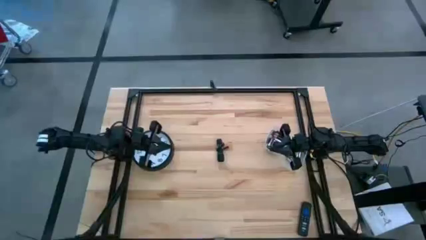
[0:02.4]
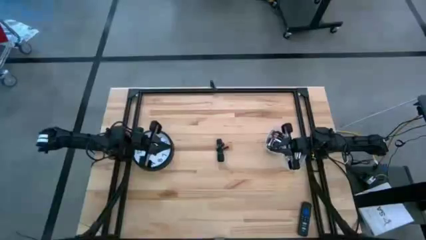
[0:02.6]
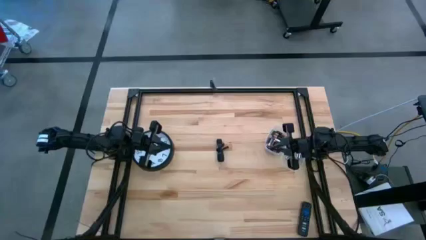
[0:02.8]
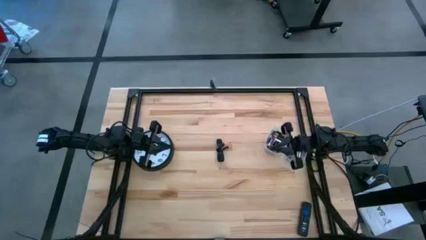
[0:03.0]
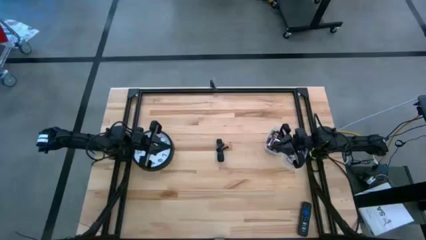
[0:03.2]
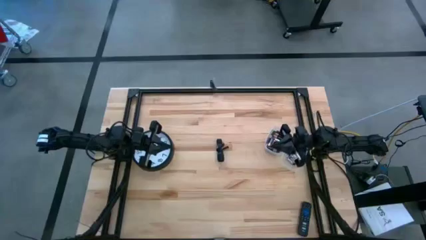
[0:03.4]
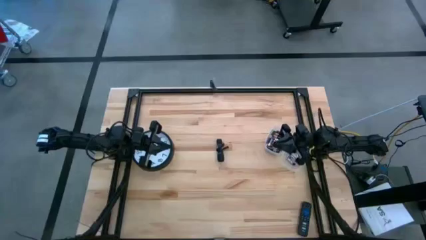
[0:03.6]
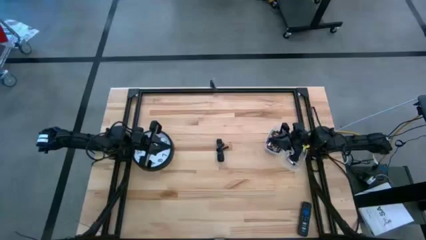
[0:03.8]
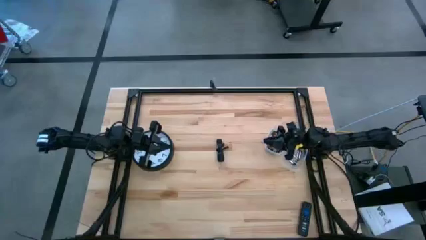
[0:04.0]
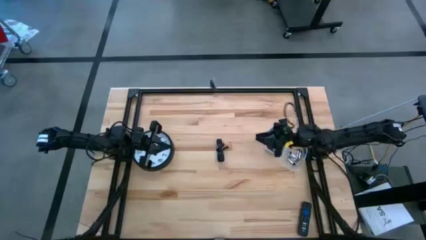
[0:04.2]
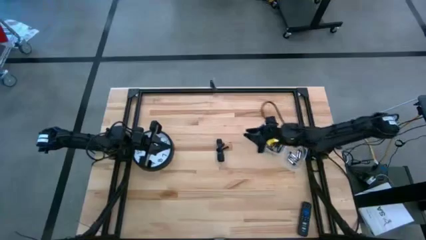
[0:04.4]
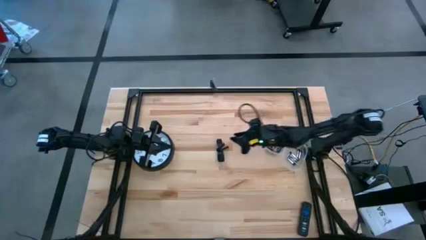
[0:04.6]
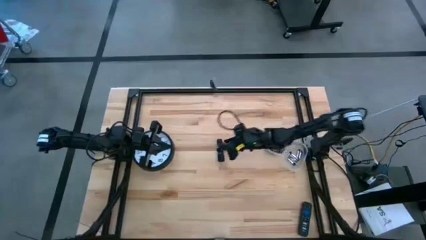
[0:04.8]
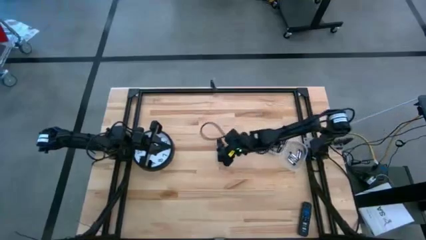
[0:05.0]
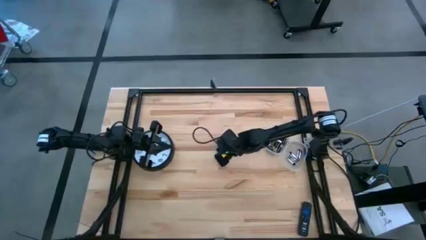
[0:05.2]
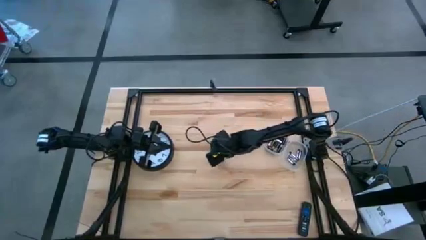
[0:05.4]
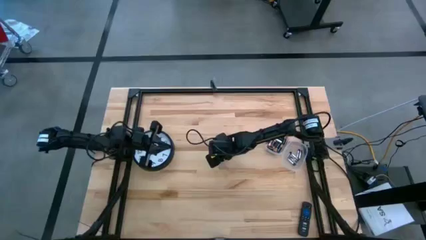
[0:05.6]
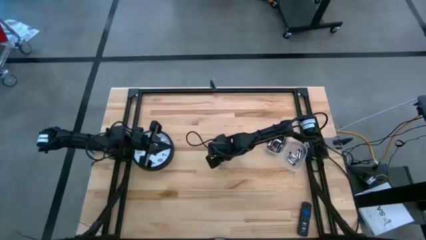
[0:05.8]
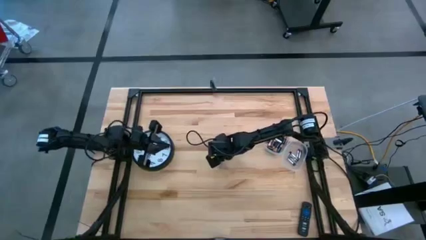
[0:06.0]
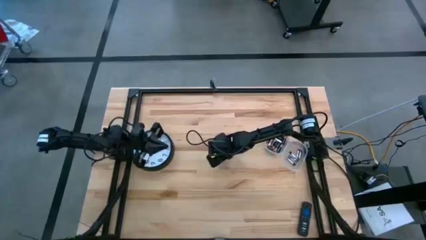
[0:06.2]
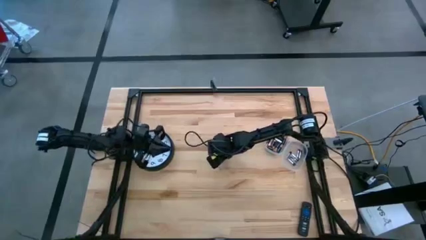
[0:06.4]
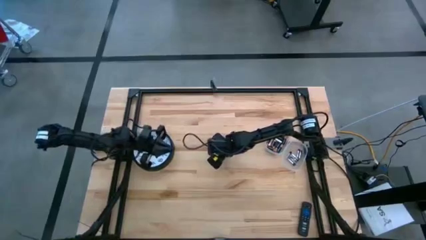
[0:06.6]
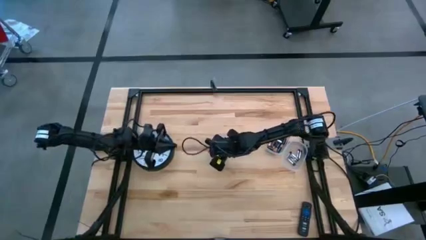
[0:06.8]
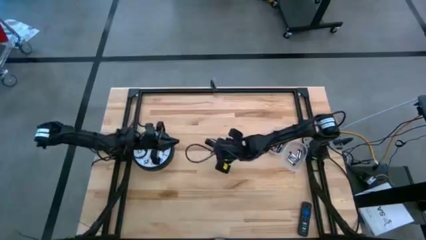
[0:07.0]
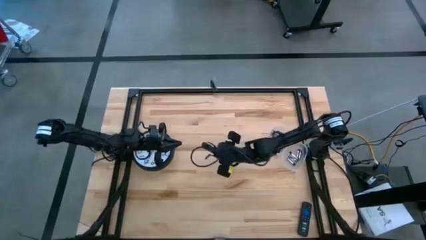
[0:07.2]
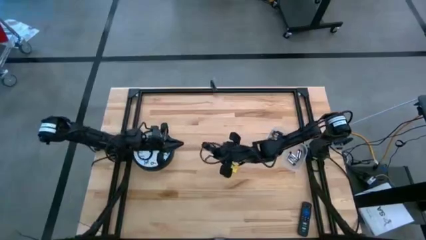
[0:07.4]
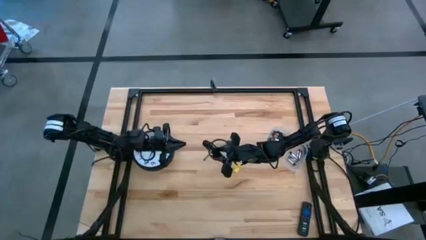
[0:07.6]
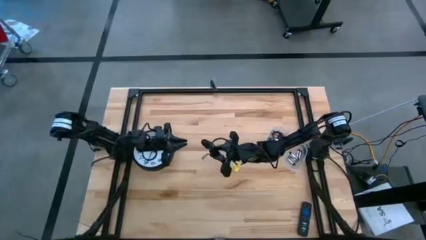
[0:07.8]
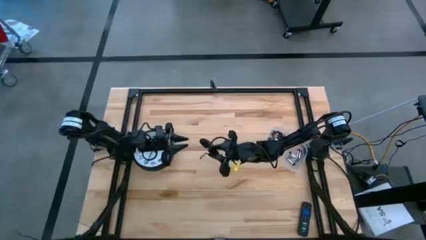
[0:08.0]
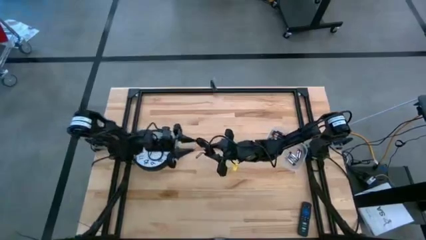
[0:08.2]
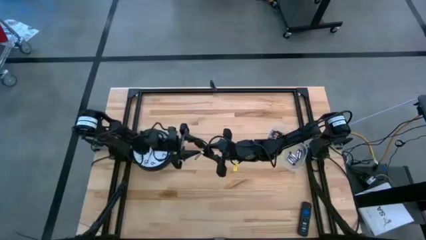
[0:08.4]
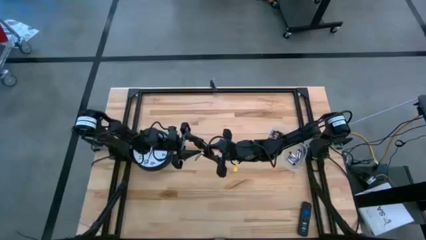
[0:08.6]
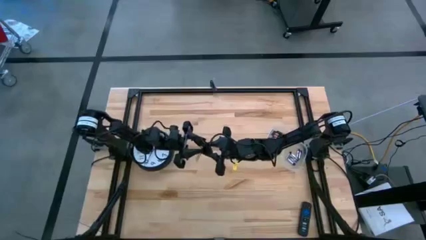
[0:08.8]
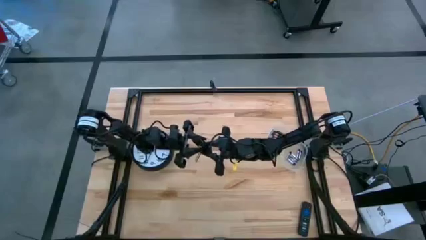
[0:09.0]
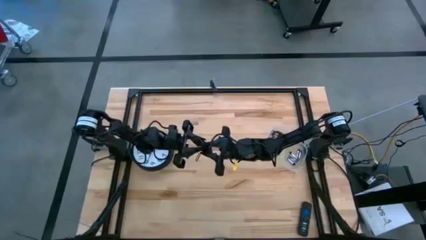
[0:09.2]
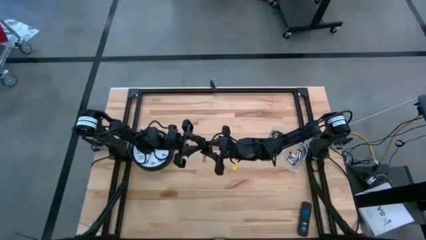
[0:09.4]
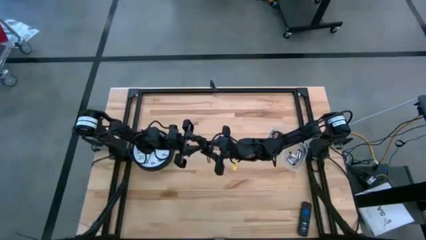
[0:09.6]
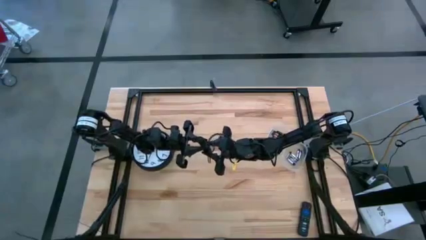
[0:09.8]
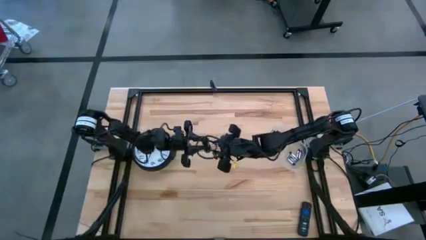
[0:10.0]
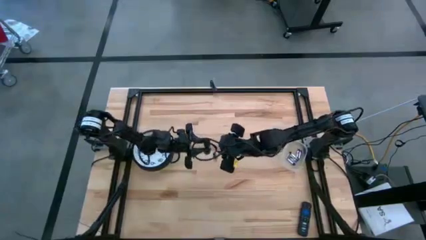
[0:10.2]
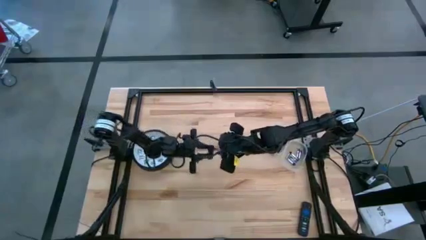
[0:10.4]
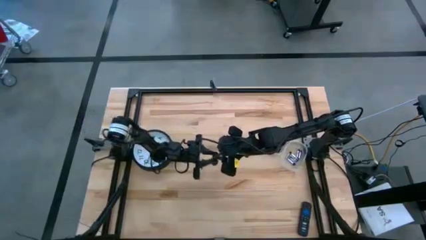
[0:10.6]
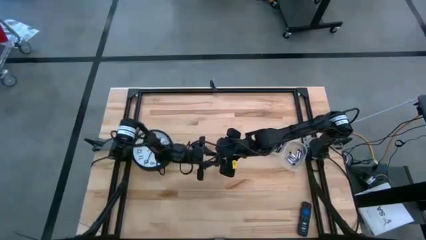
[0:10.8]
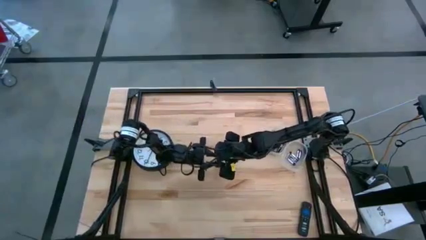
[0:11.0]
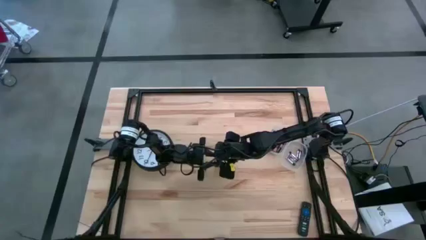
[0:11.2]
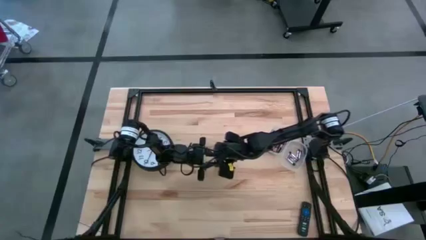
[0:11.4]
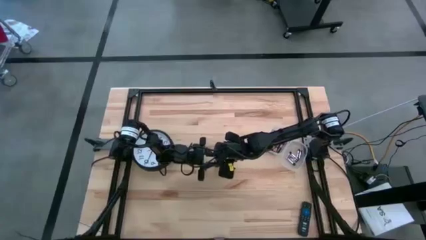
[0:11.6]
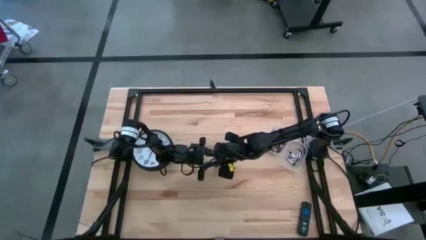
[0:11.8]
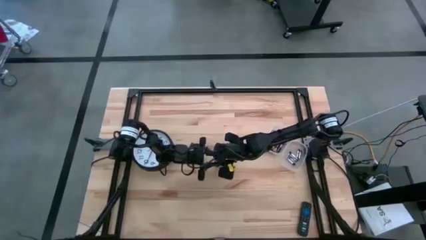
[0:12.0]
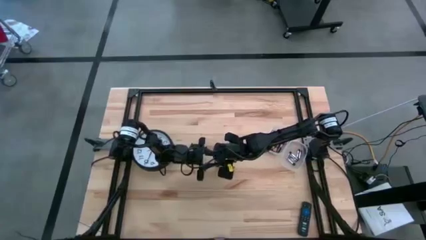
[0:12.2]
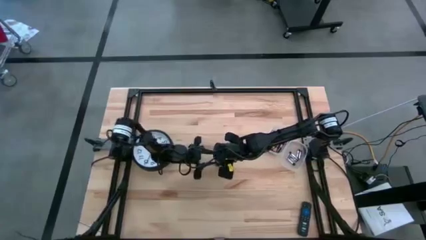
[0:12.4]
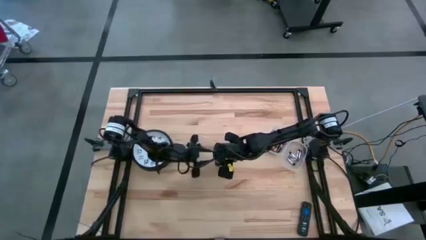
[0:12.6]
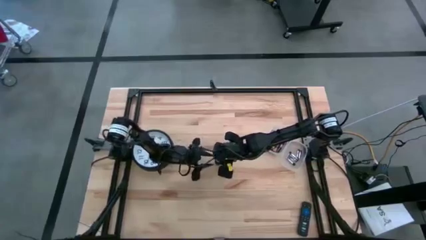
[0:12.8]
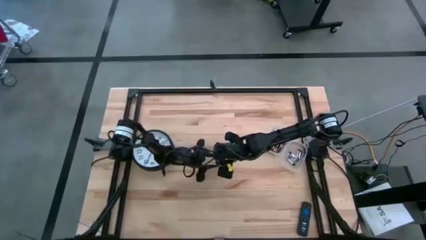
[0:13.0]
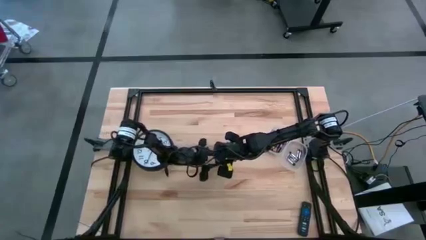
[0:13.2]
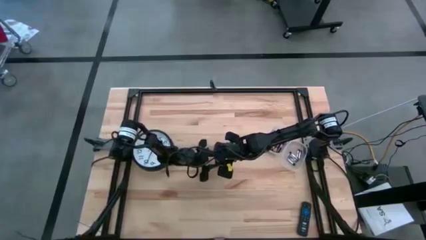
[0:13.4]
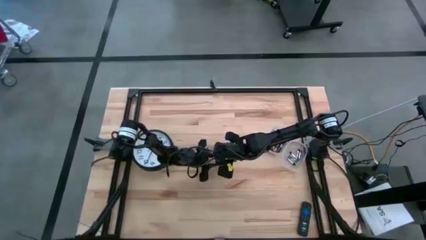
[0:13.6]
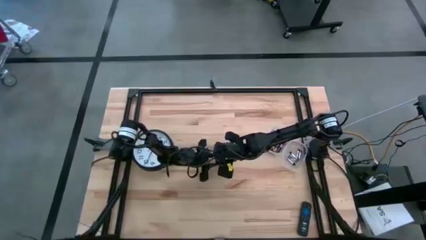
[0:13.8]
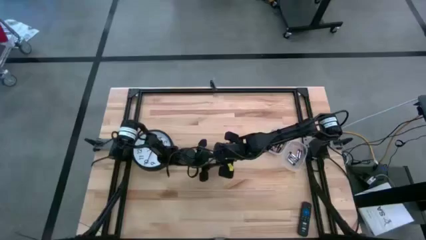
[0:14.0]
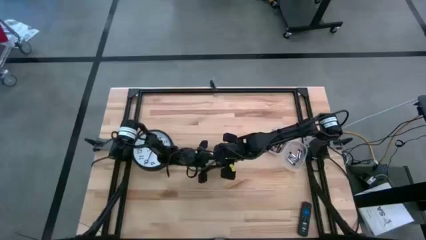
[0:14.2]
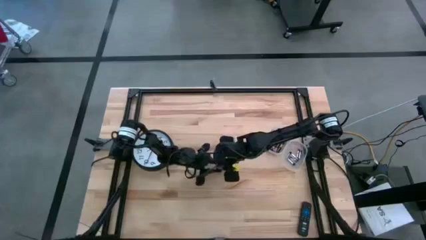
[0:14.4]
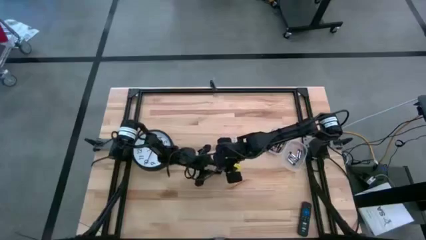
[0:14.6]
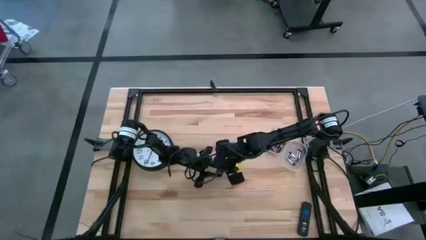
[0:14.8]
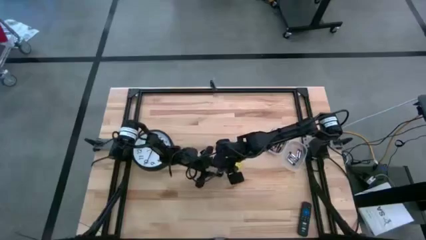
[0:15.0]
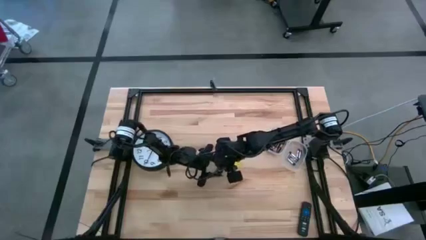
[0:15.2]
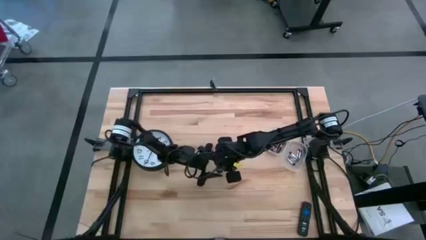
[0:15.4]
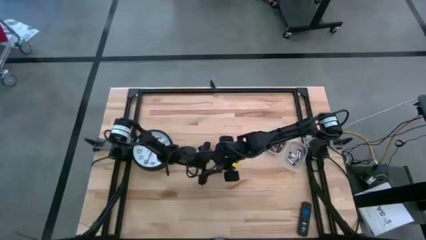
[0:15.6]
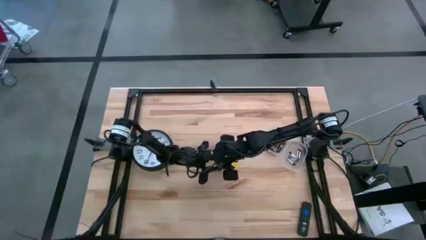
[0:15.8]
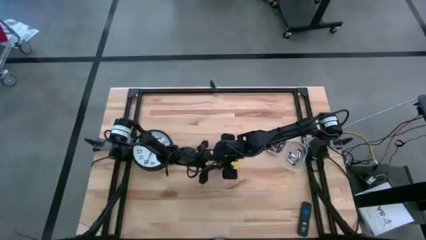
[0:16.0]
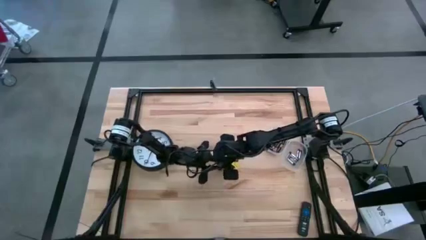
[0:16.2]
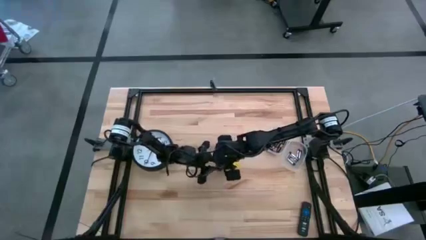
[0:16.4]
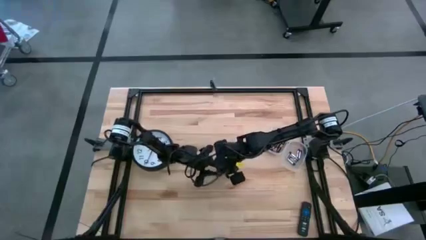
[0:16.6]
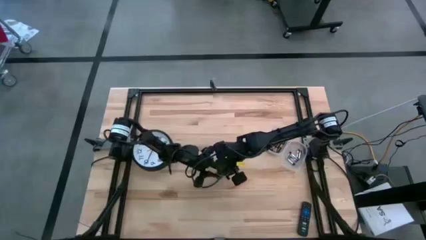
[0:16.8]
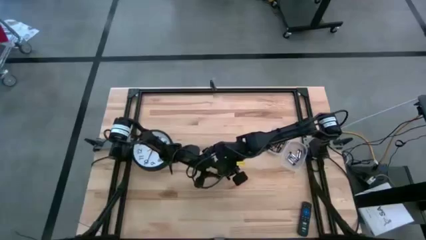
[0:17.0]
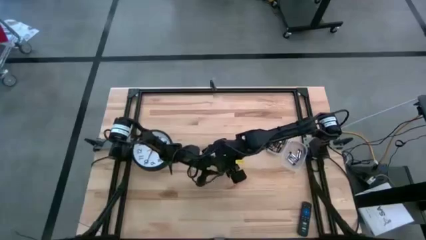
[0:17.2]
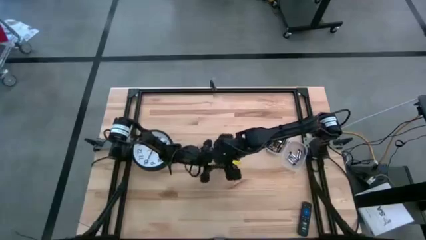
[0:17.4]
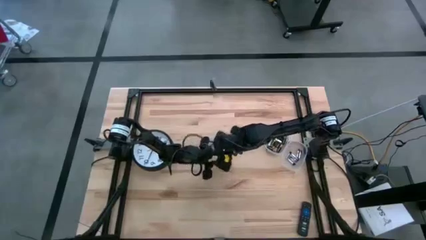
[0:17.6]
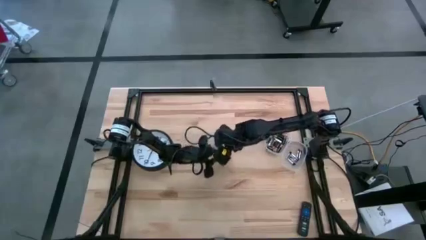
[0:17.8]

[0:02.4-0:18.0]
Task: Insert battery
Open the black flashlight battery compartment
